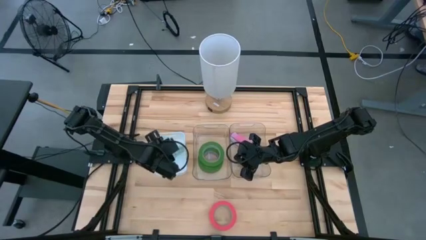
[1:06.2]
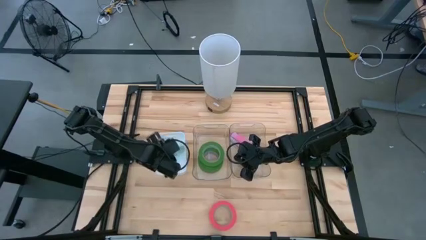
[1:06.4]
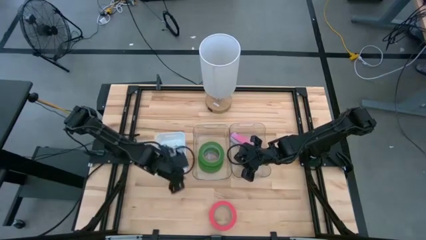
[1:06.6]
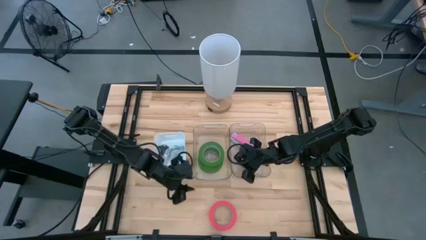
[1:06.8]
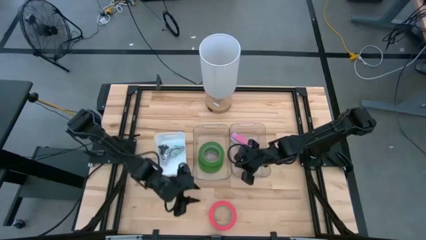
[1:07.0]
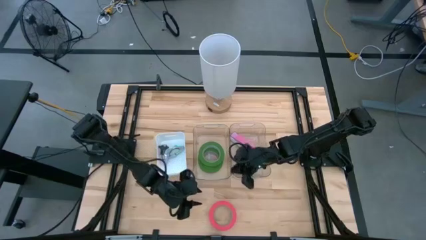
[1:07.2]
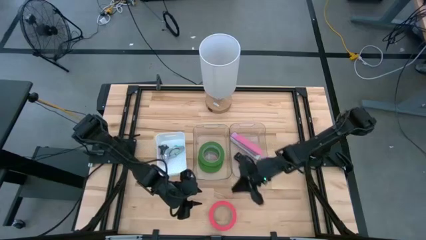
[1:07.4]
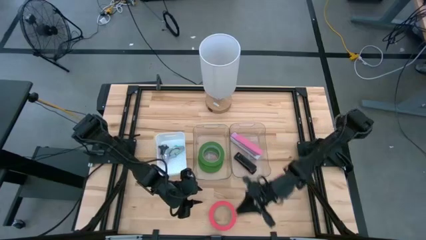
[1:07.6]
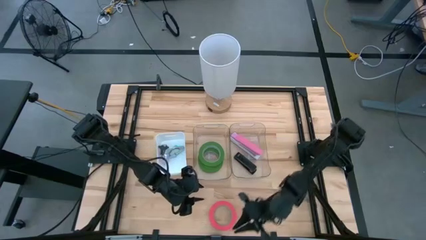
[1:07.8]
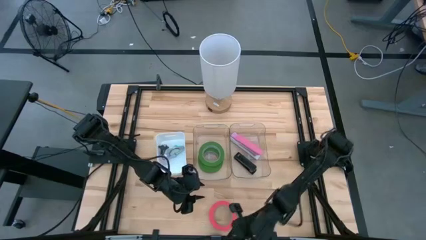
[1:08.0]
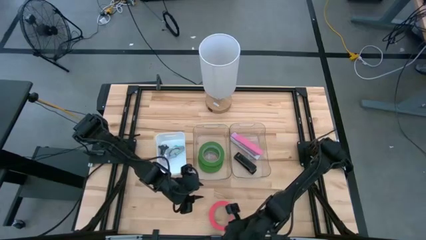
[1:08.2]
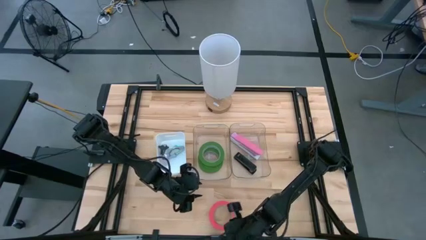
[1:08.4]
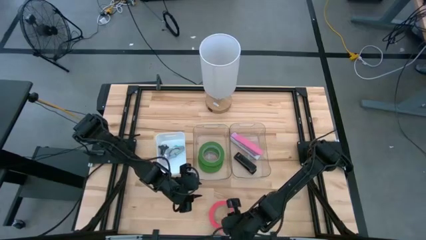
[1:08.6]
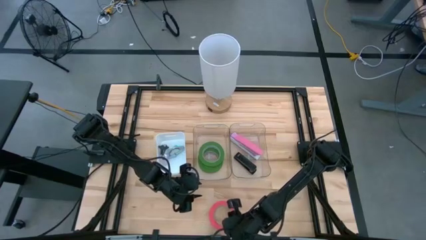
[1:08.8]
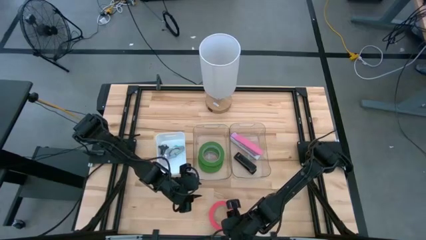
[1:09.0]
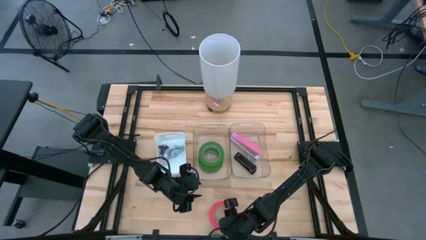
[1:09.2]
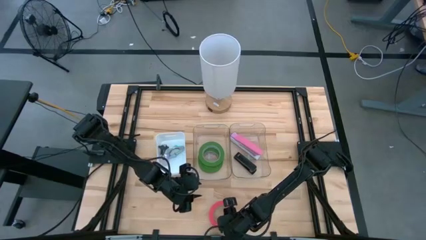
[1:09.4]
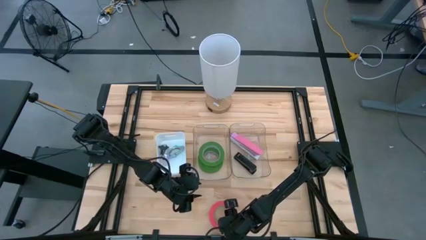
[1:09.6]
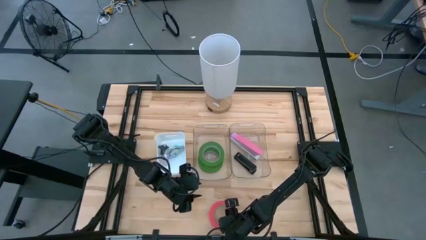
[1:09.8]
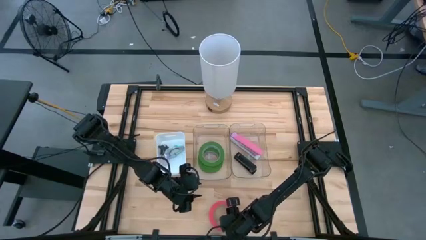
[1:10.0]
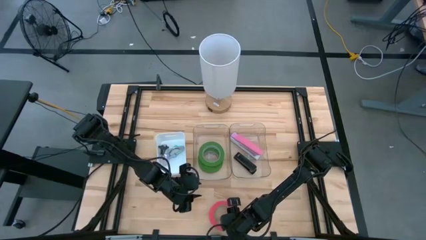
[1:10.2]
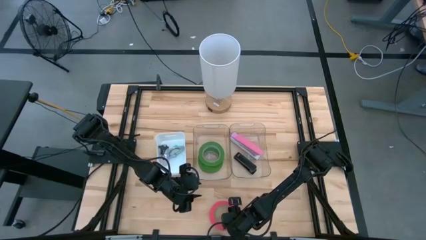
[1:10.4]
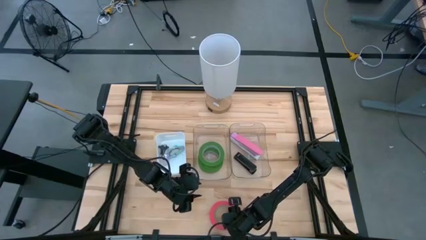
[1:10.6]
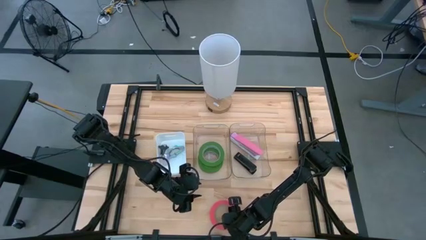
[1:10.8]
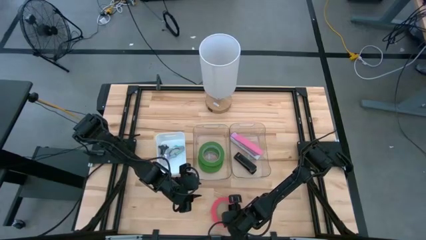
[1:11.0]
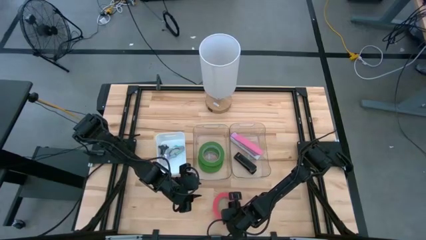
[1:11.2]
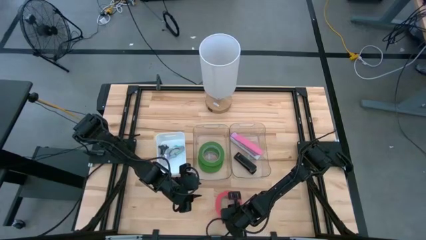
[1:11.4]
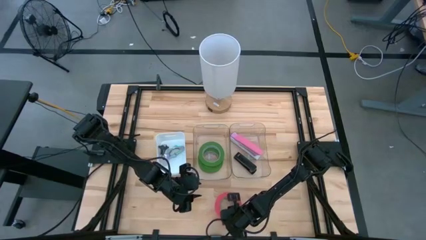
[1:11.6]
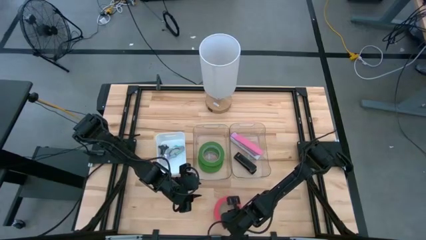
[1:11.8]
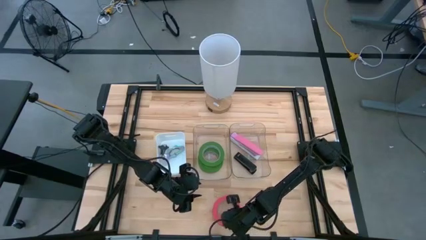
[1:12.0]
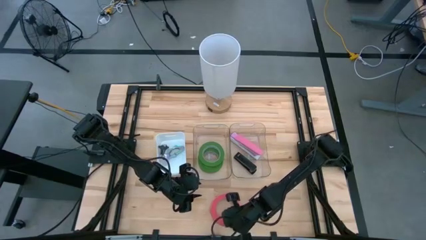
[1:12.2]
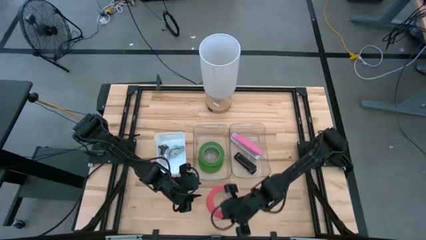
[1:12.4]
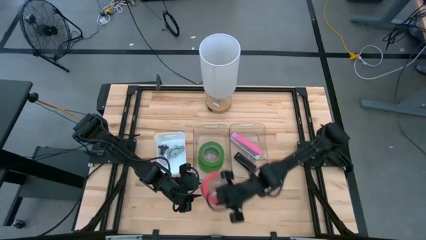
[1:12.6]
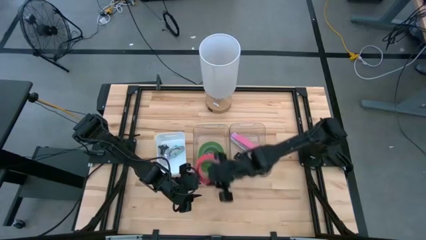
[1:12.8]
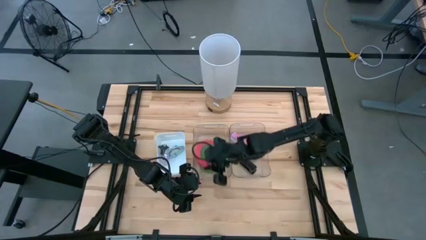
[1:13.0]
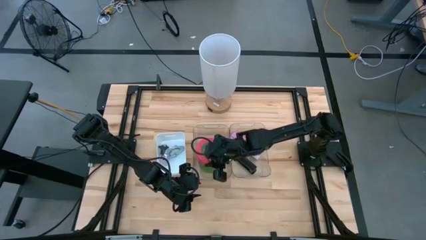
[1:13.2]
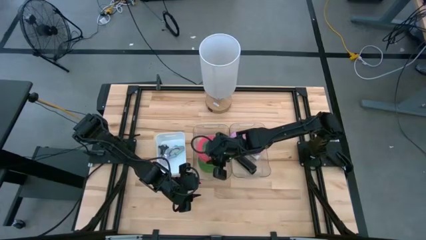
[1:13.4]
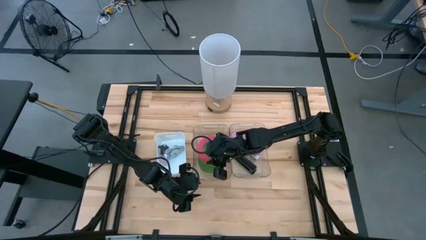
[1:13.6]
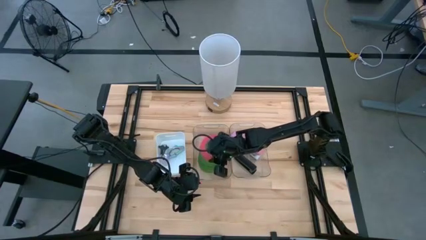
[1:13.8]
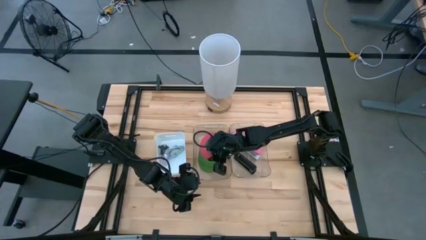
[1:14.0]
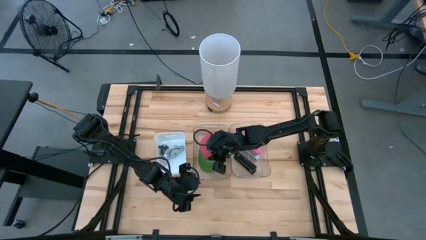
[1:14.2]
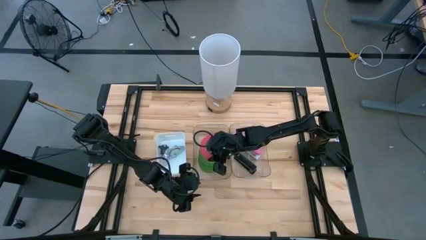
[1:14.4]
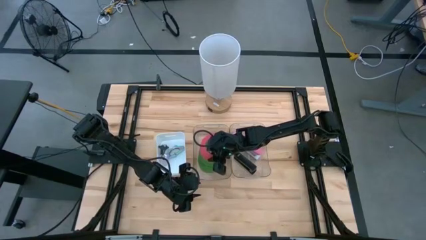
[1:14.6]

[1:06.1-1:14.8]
Task: Pick and place Stapler, Stapler remover, tape
Put the pink tape into the left transparent bin

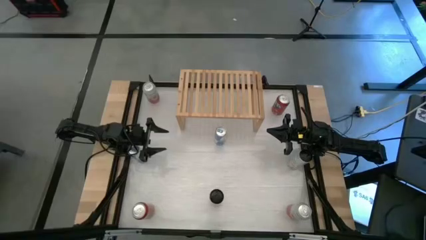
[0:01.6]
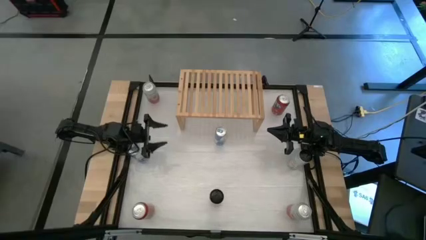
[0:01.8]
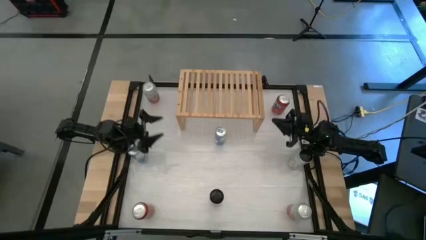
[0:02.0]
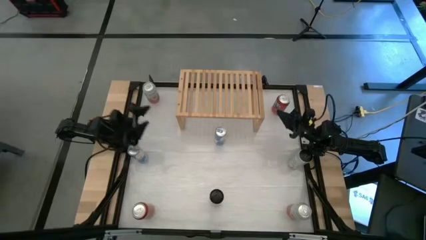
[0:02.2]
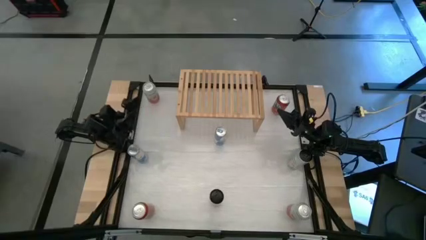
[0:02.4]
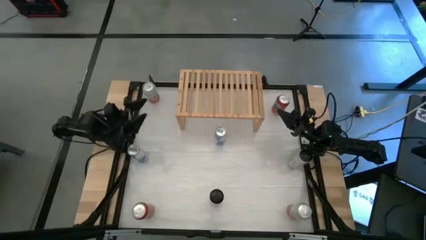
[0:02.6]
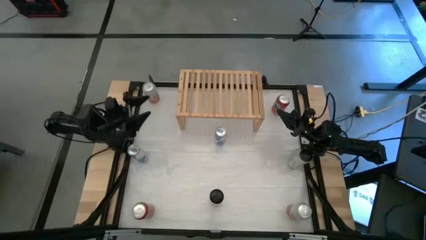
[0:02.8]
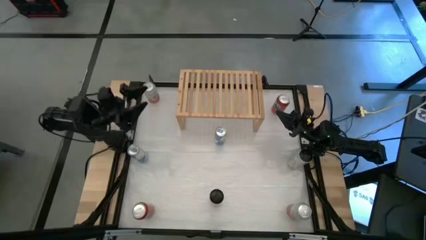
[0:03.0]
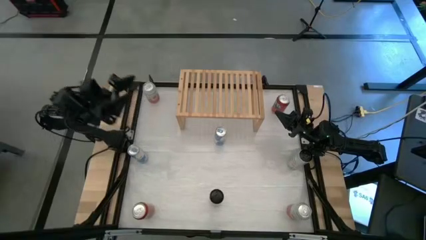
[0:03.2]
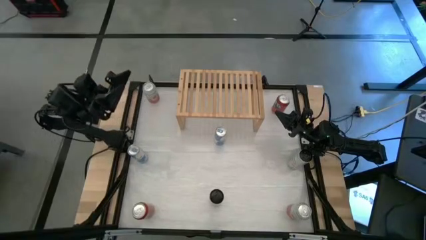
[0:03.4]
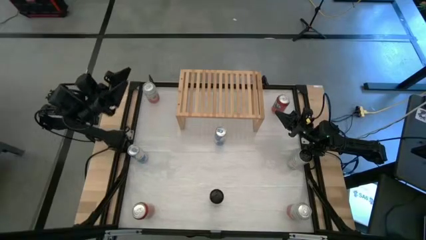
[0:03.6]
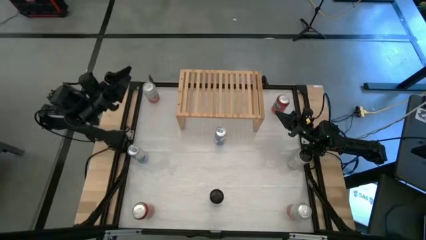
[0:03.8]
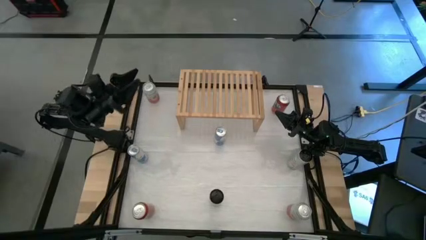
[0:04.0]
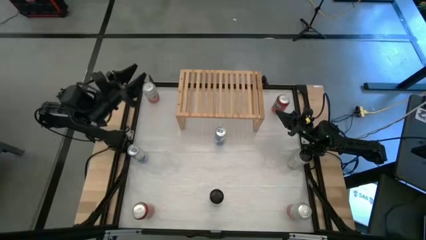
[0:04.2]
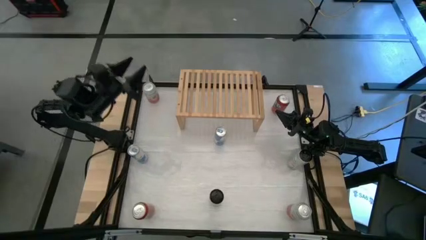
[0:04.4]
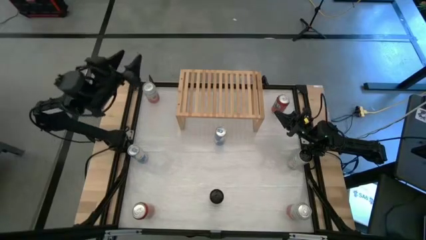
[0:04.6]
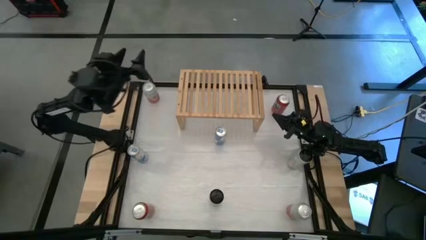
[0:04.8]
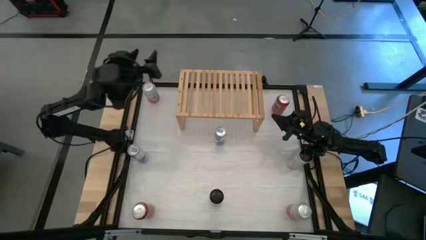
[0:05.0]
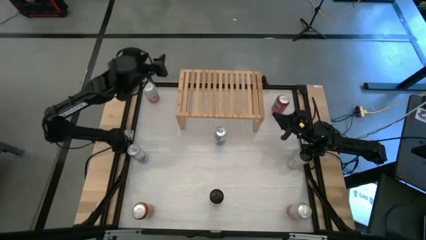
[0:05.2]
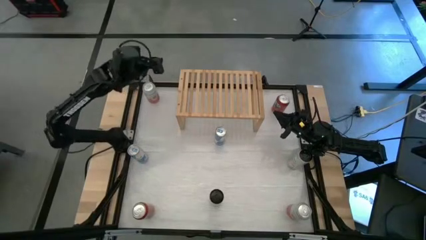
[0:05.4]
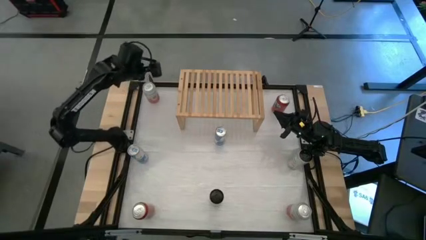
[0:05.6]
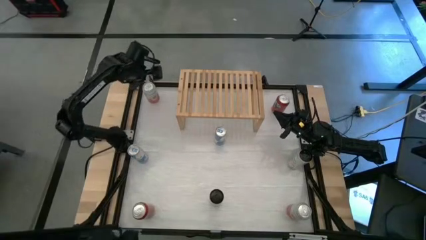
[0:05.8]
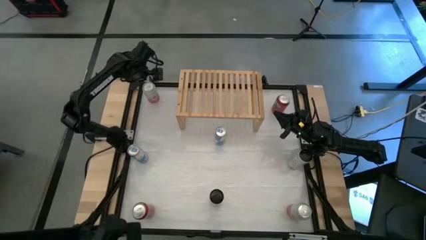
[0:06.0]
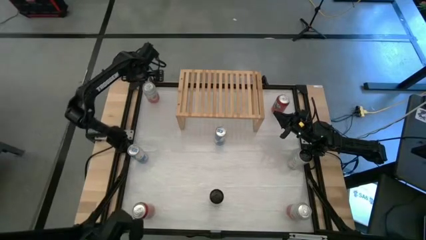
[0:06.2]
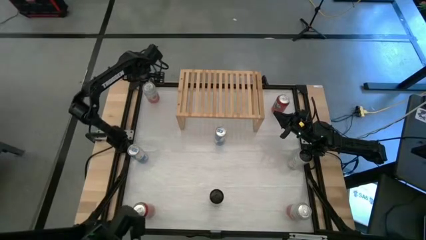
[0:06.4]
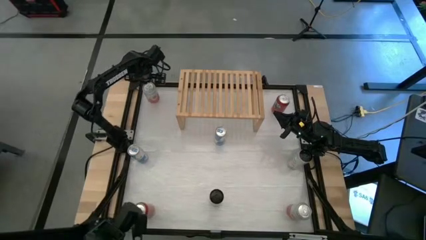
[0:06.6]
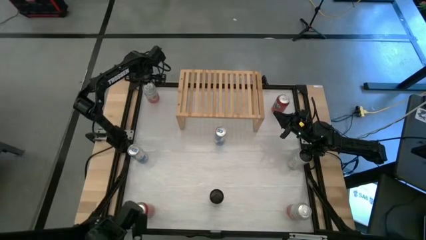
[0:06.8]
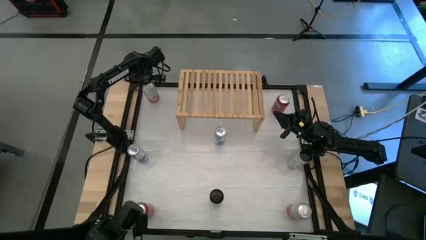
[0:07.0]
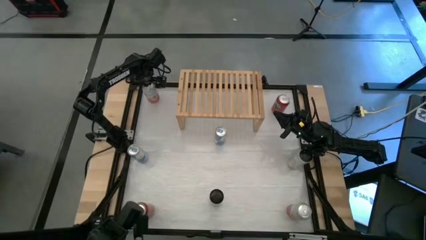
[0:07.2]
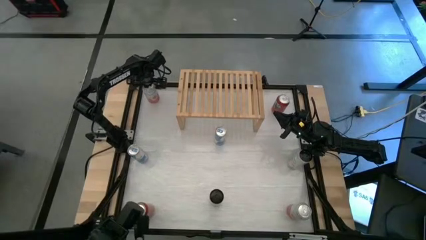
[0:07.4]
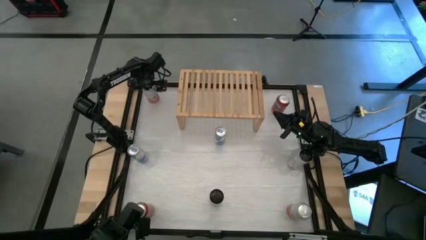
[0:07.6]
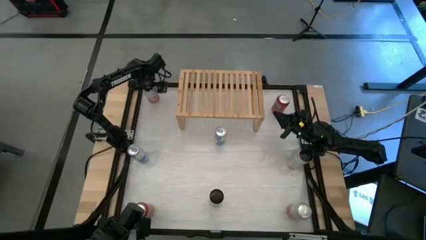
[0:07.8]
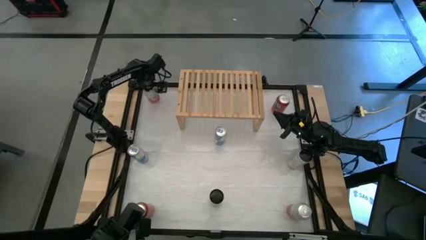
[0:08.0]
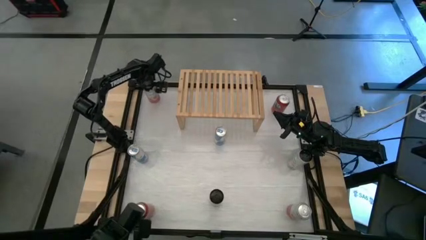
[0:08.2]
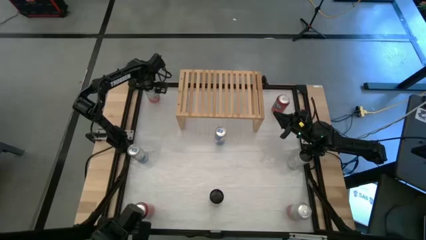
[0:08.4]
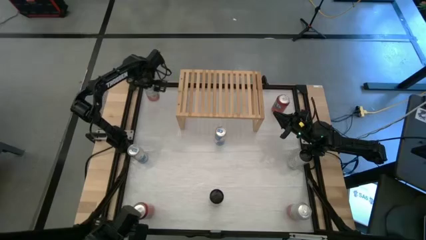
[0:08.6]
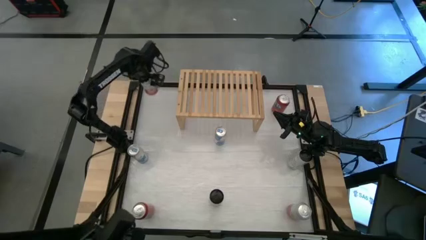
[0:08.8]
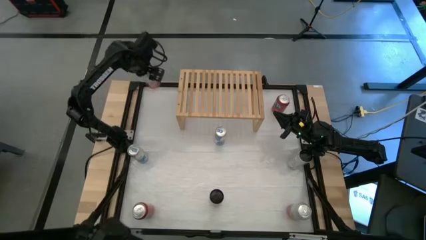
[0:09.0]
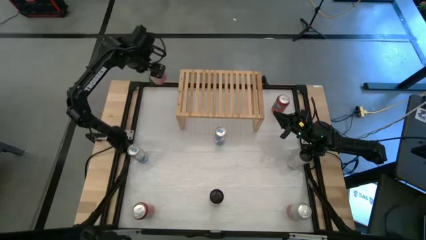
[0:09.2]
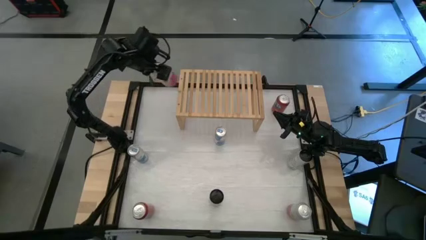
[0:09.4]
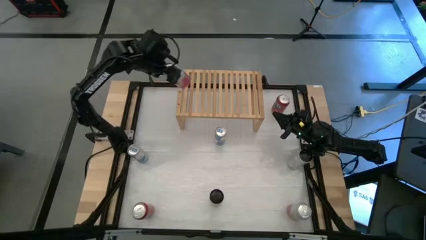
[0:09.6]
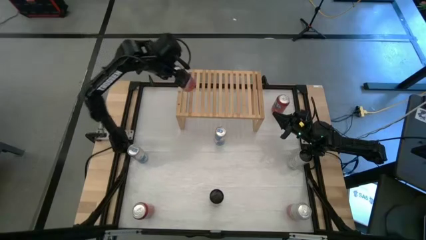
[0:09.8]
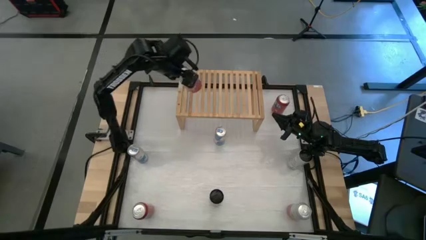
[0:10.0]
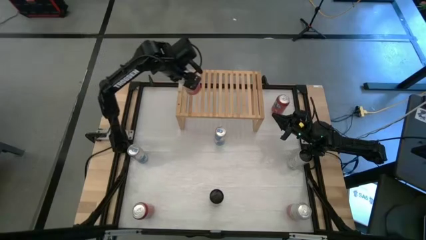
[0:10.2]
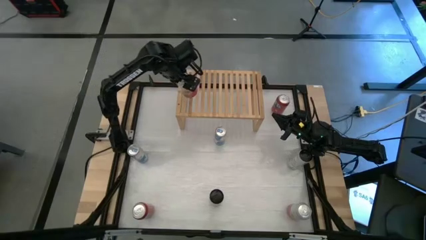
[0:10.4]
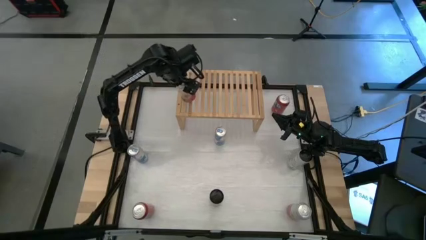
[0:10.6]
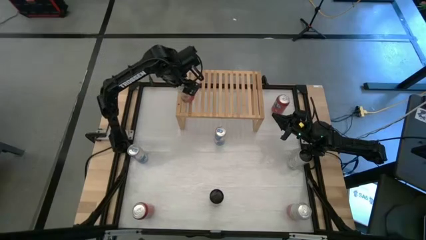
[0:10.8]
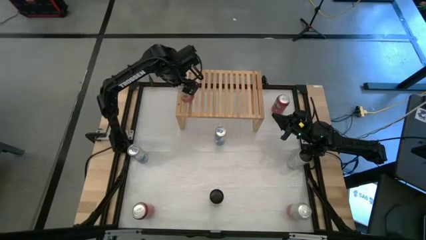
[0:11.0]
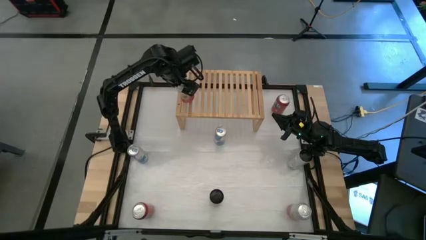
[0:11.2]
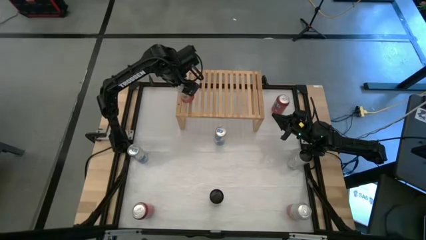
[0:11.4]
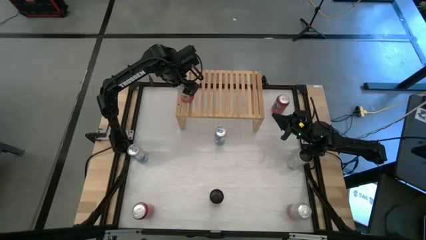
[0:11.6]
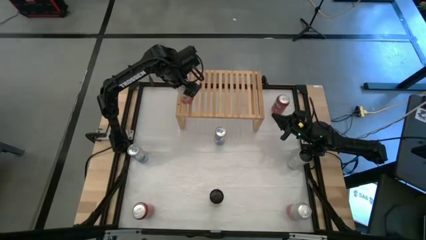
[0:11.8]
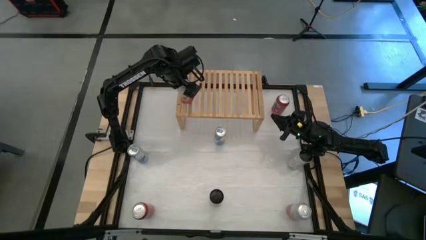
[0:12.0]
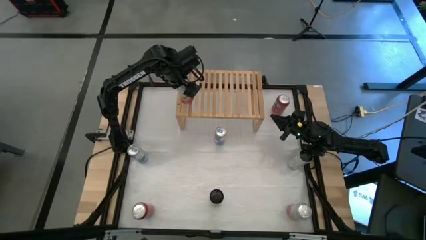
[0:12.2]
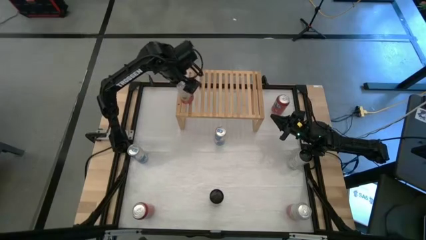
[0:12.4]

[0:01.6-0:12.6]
Task: Place canned beverage on shelf
Put the top pink soda can on the shelf
